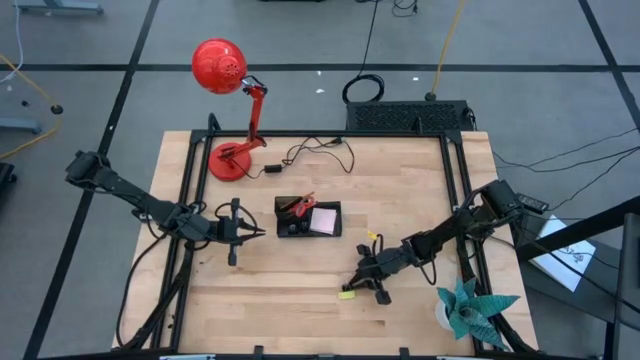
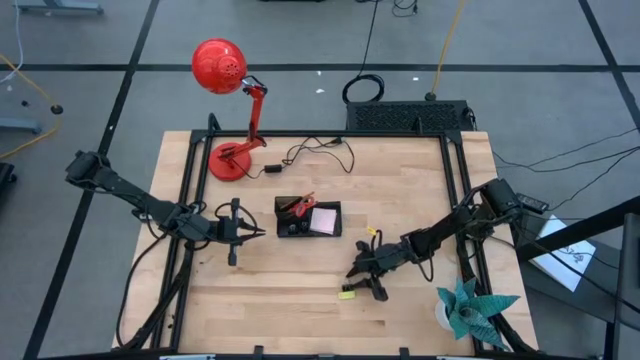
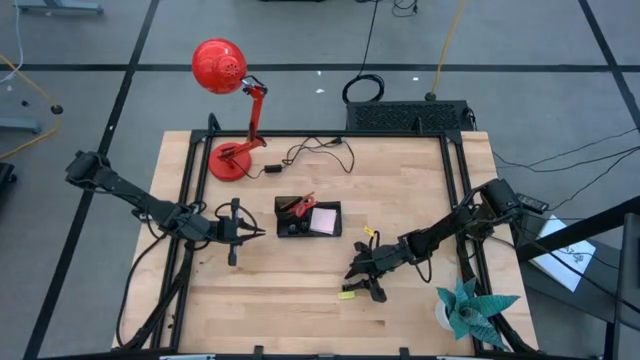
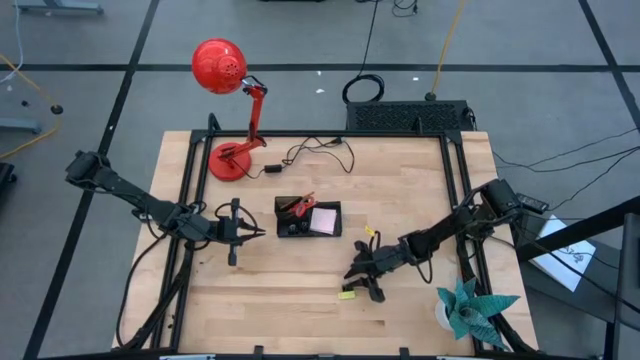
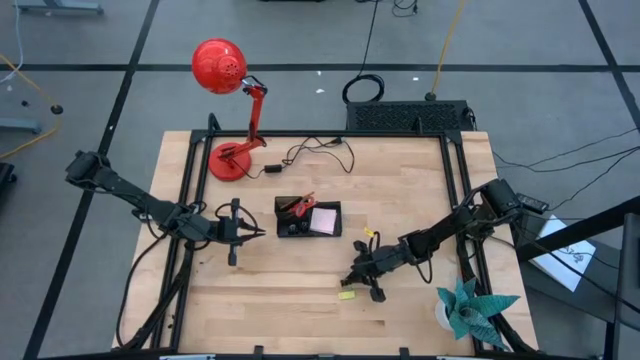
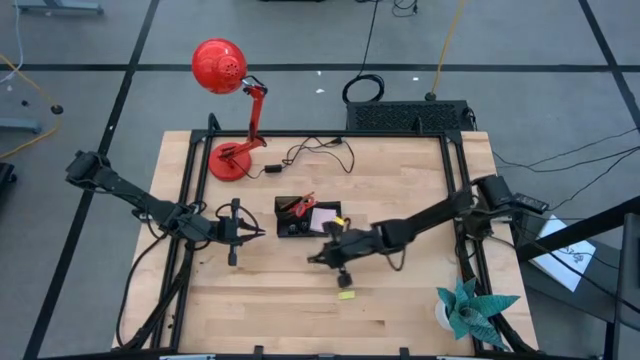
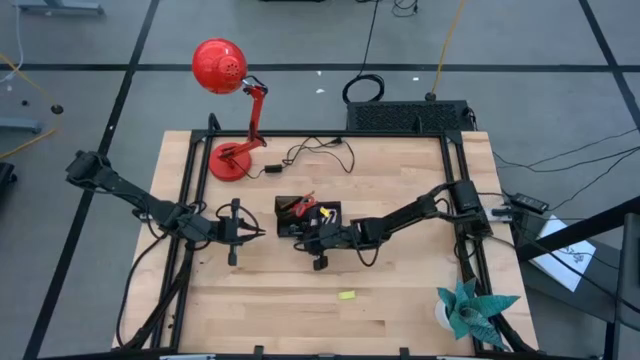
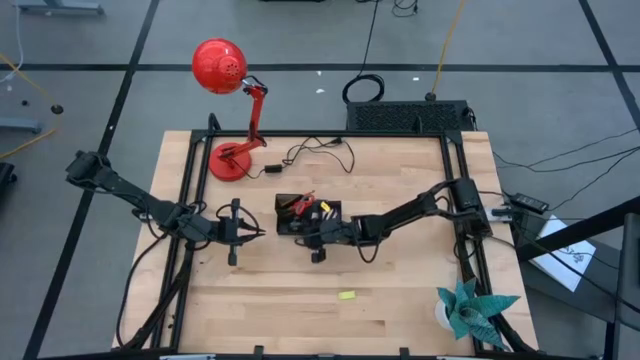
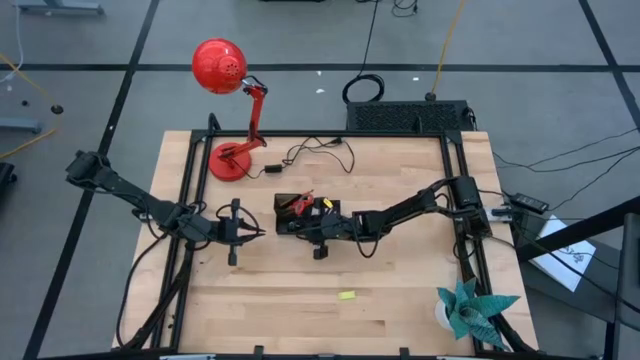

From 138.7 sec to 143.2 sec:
Task: Pick and place office supplies into organizer
Put the binder clip into the desk organizer

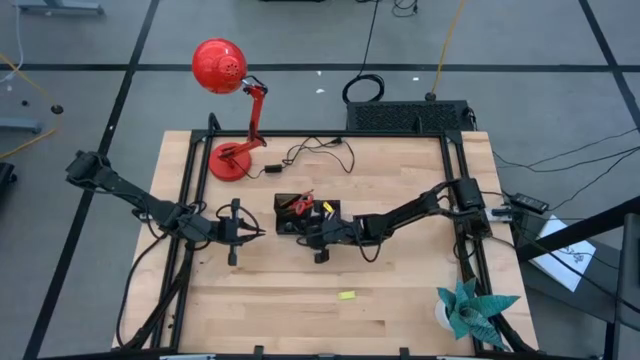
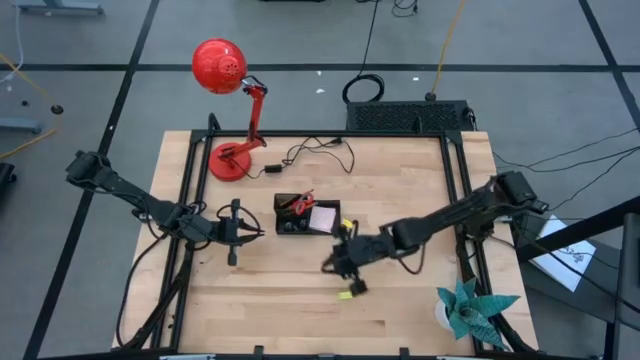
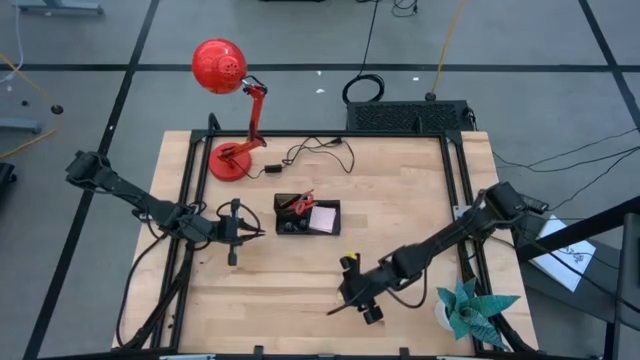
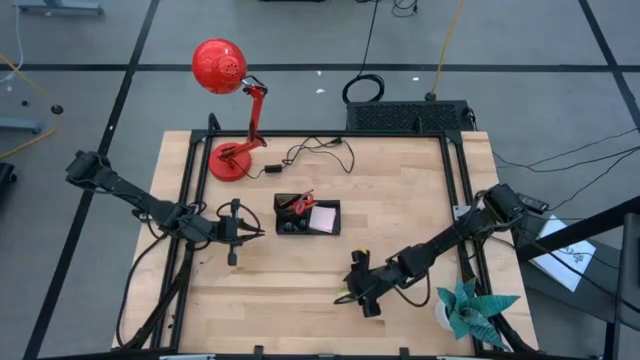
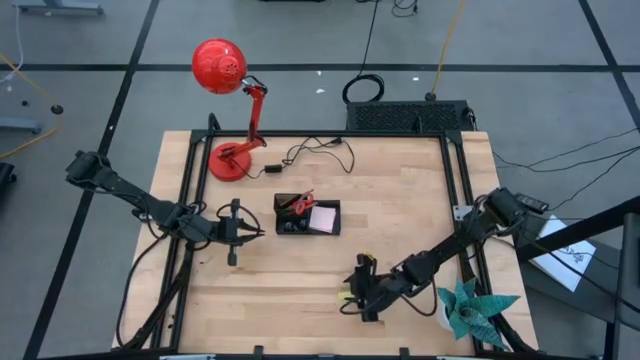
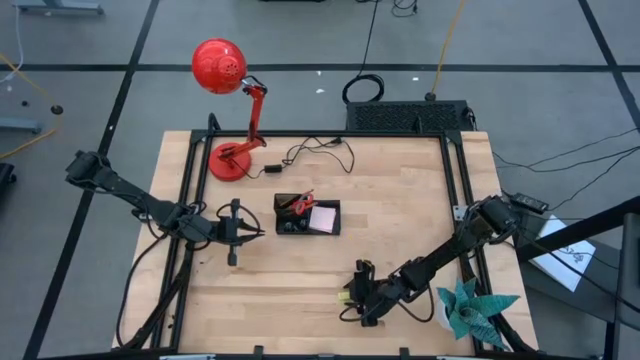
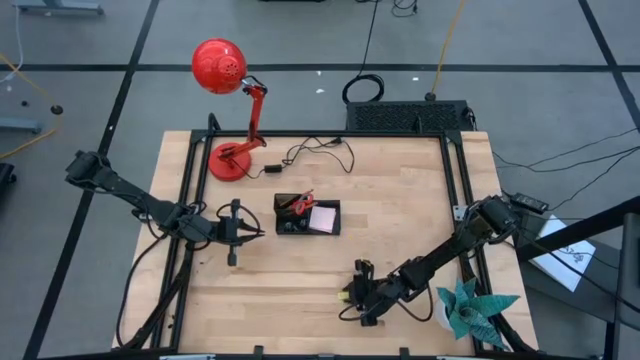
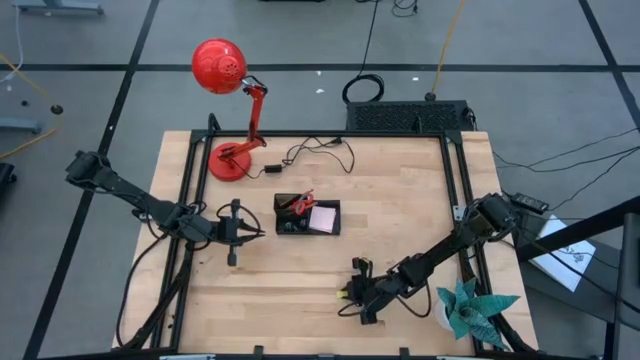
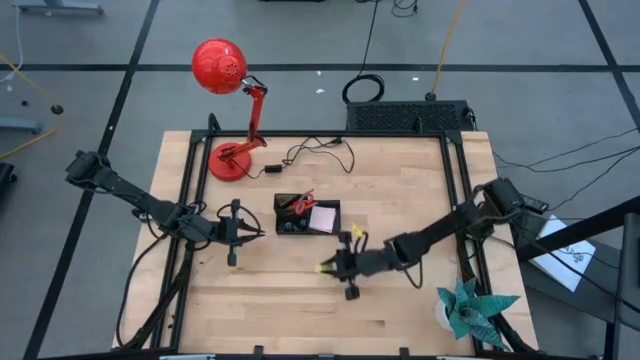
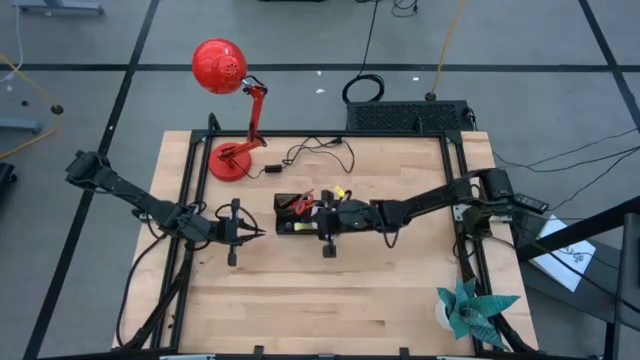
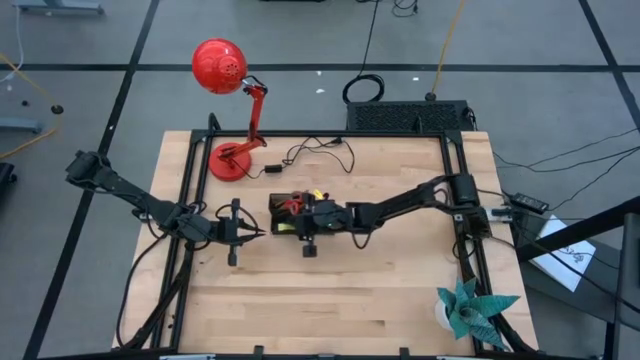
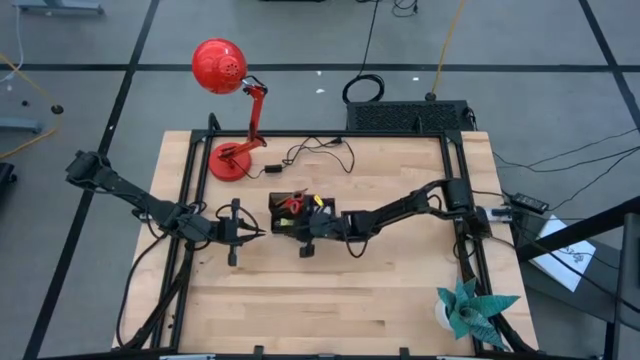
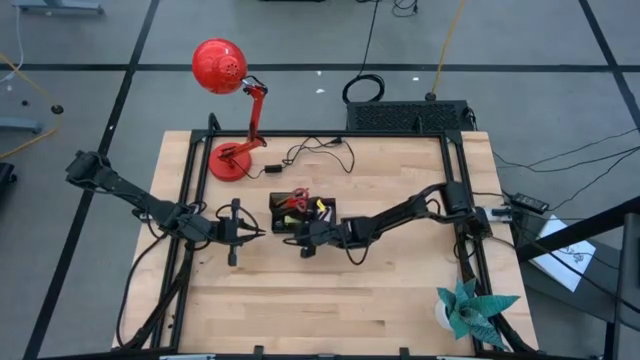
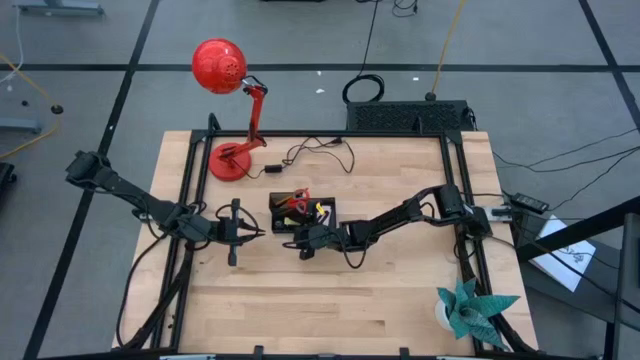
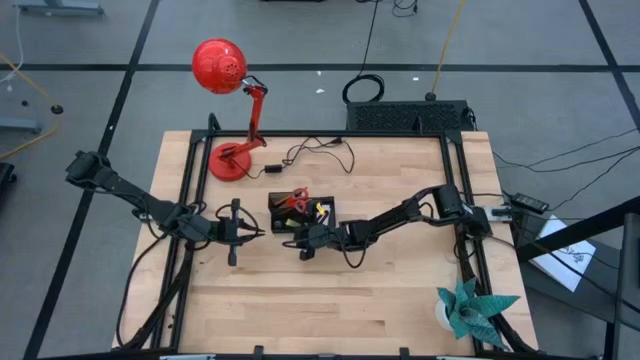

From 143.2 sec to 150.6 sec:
Put the eraser into the desk organizer

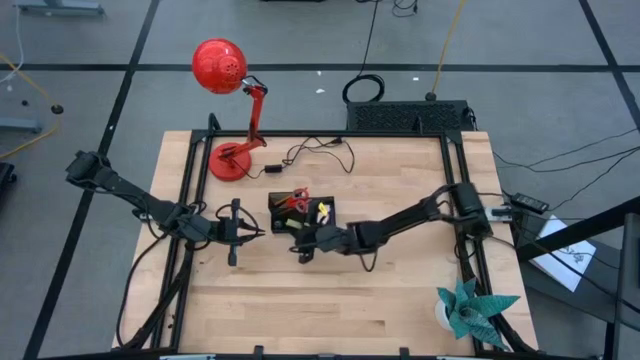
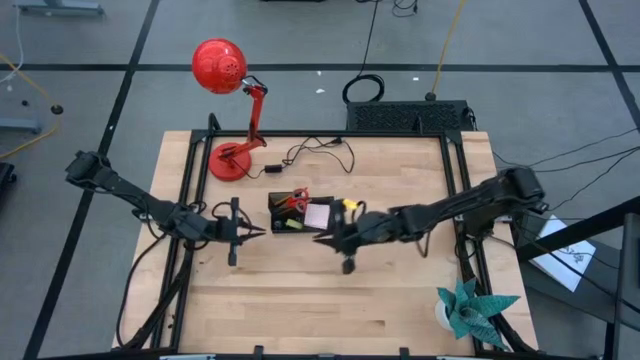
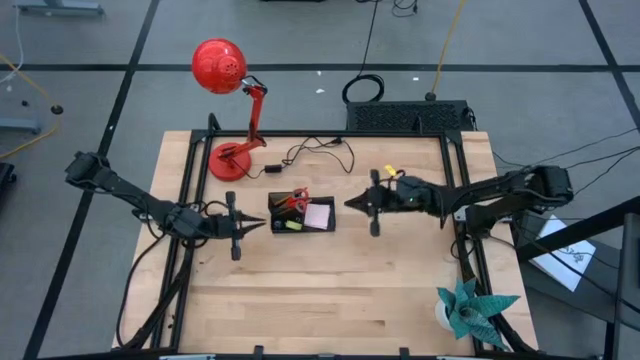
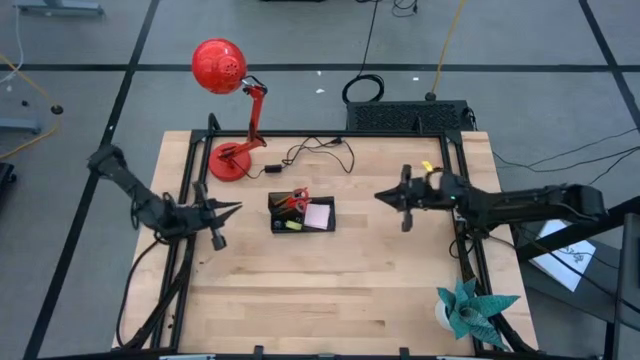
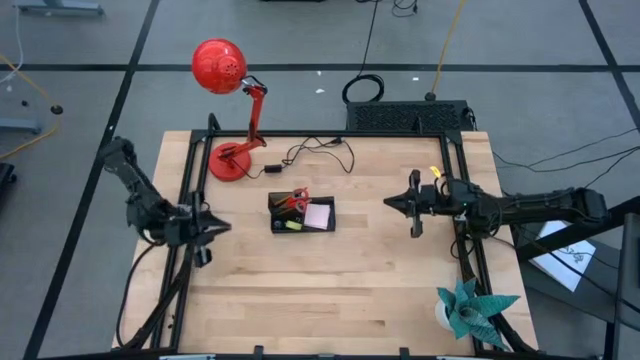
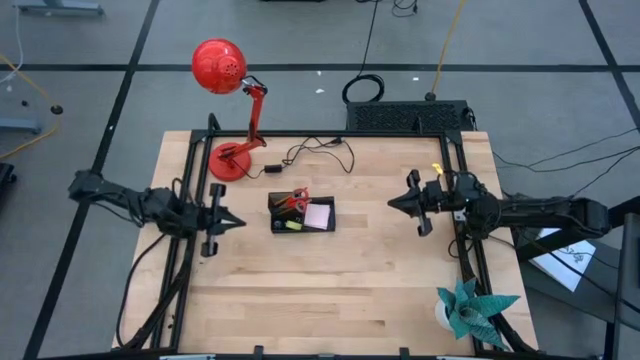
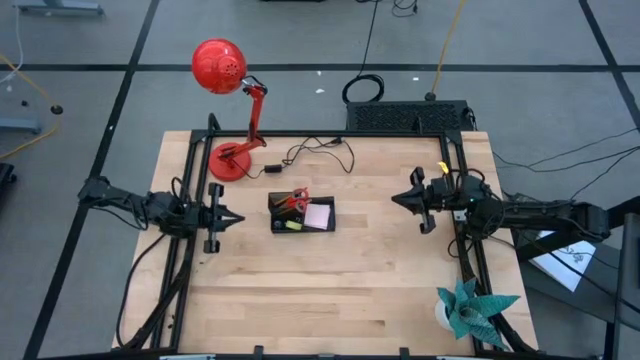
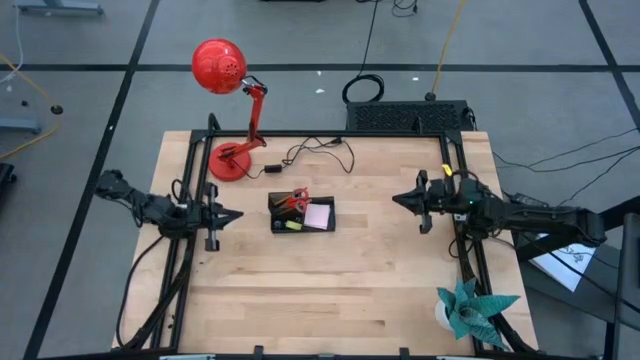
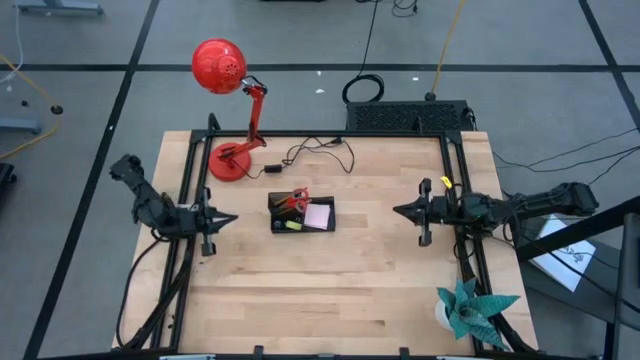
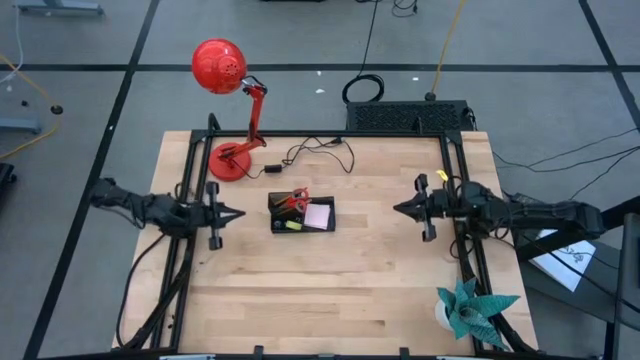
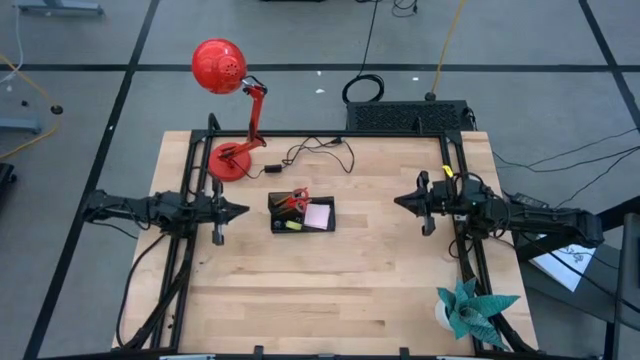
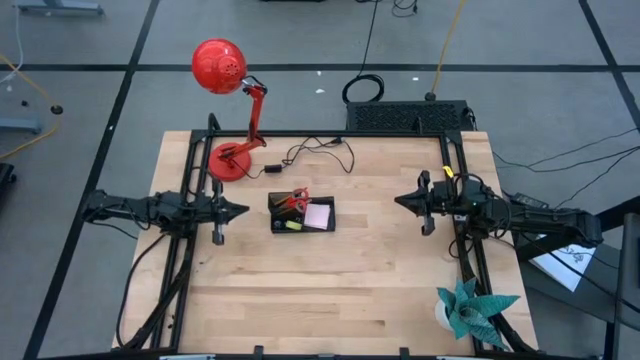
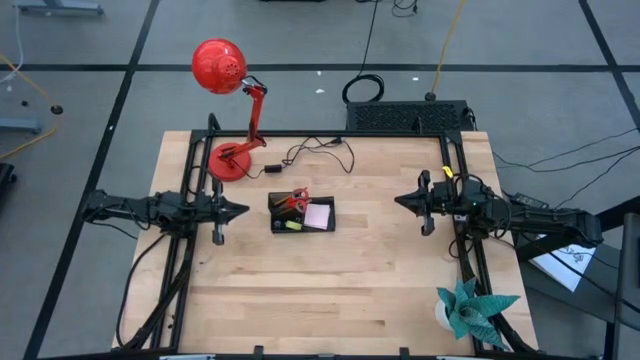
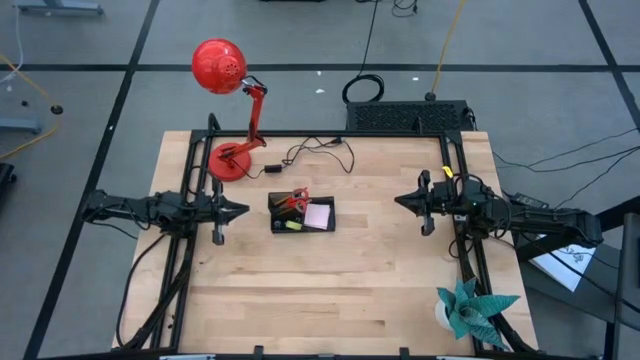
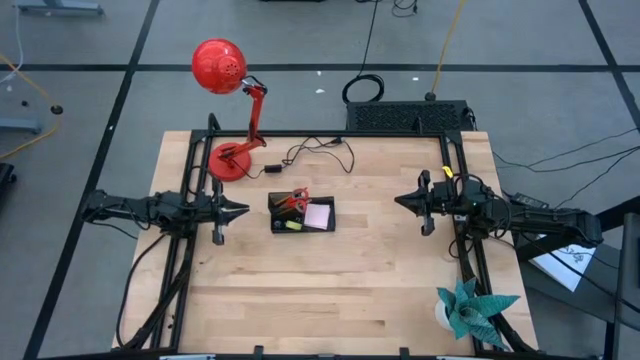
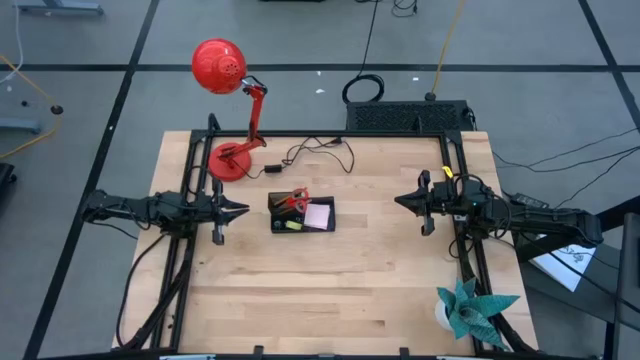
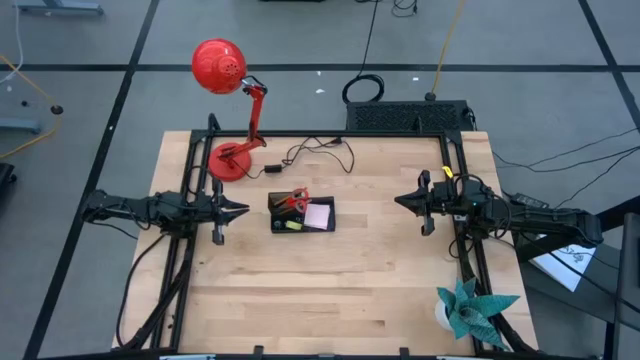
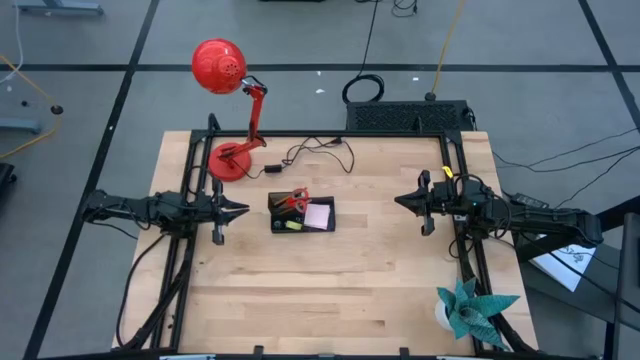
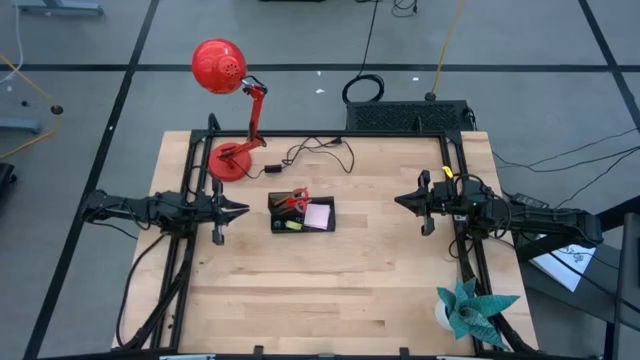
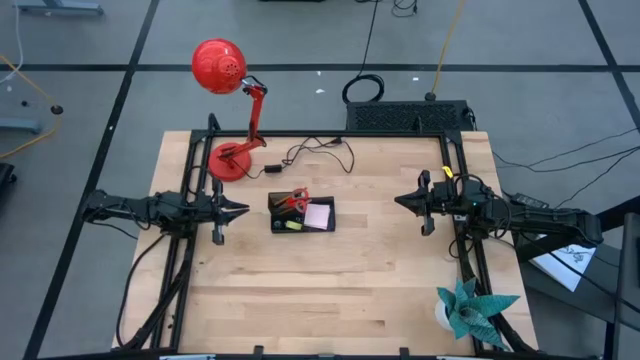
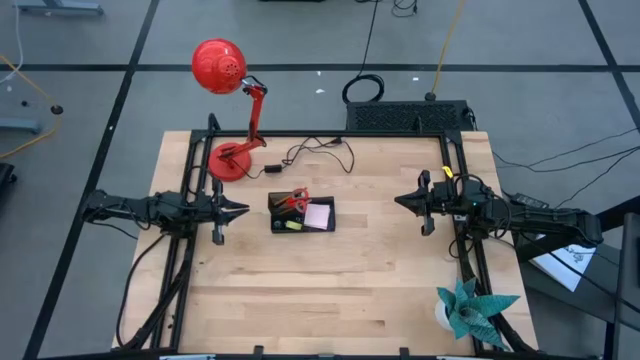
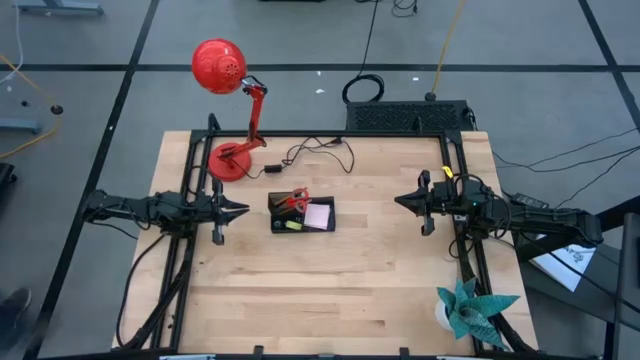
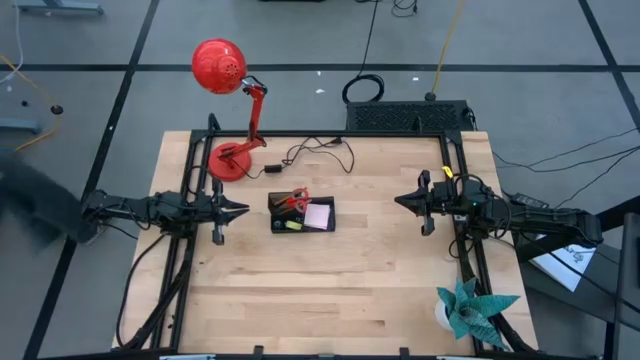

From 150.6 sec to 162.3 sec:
Return to Home Position
